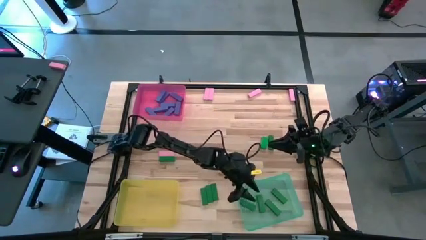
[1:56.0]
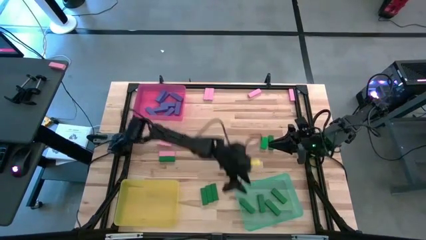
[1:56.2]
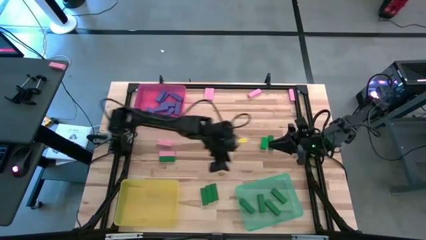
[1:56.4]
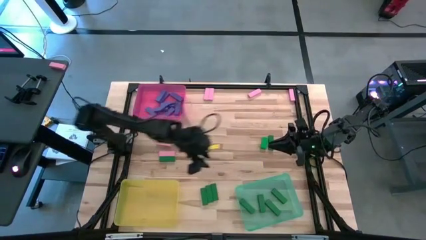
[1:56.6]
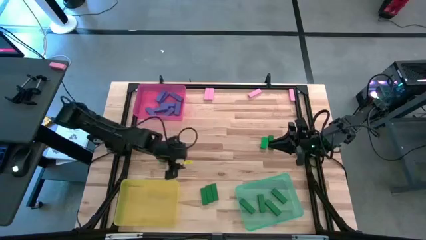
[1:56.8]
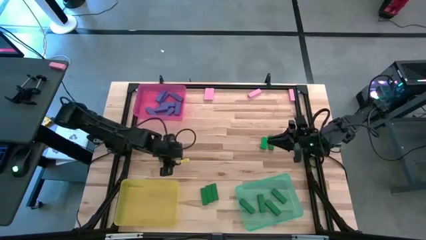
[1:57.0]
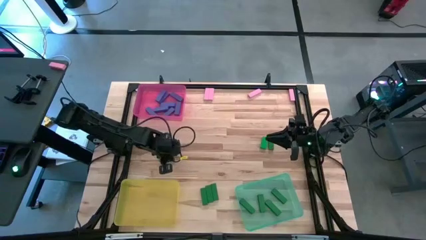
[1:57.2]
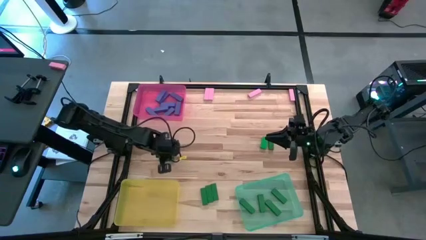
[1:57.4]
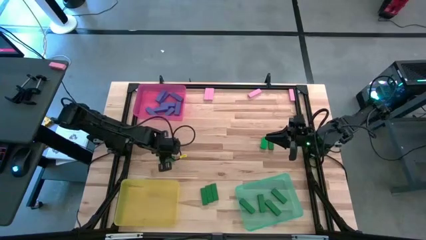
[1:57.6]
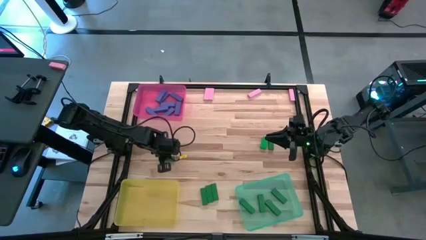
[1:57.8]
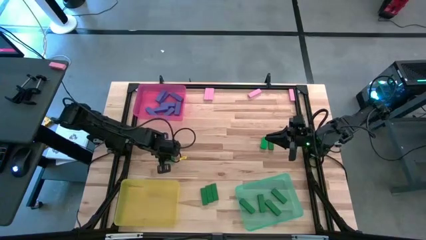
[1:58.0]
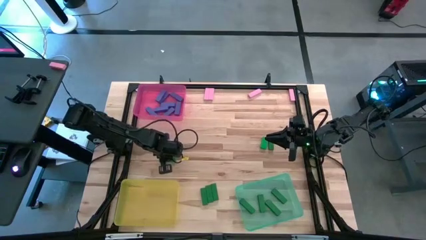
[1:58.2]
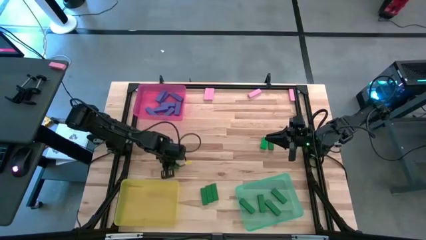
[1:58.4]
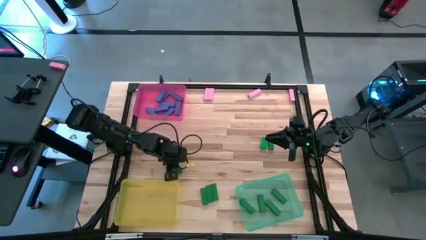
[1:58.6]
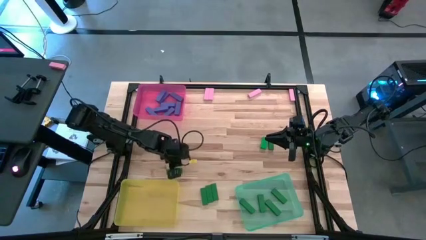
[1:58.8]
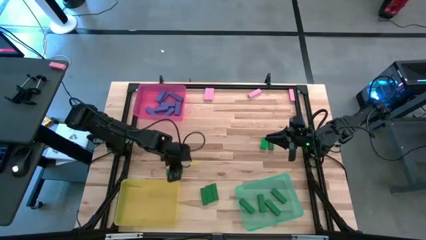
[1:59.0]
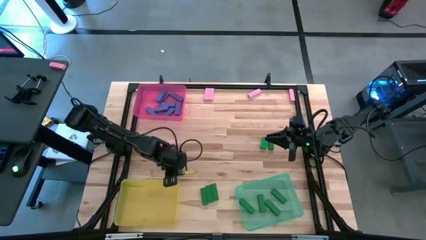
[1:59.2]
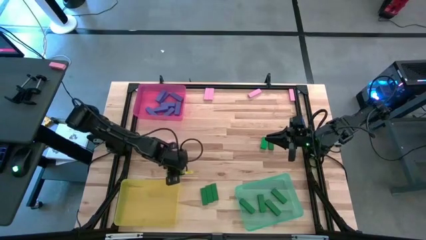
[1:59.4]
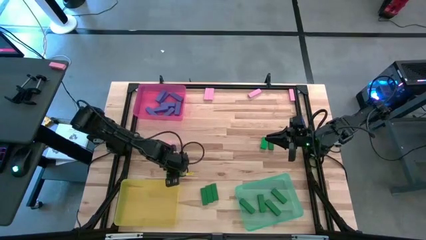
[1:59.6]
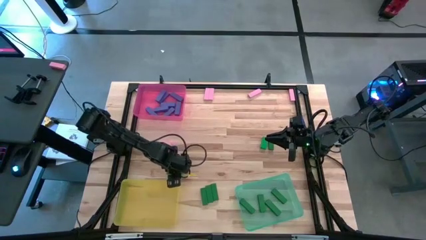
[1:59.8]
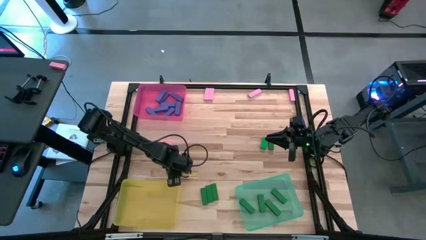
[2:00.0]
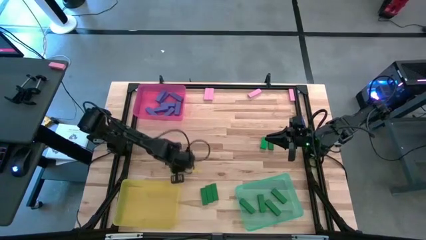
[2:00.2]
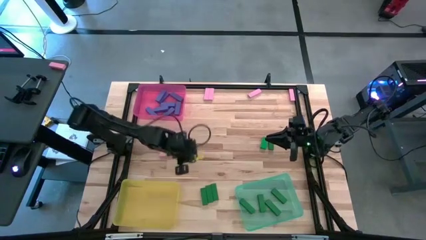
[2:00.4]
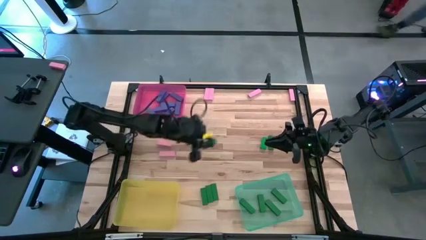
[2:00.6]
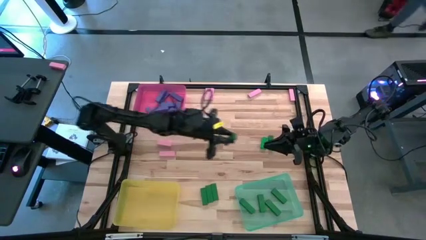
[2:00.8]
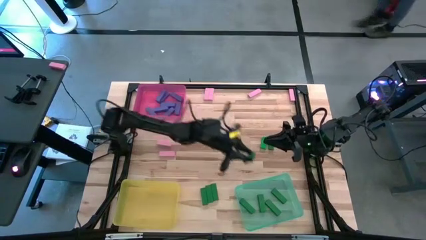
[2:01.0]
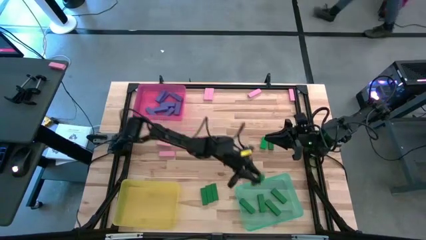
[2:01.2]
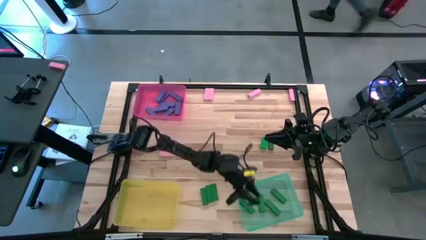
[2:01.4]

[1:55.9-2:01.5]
Task: Sort blocks
Put the green block into the light green bin

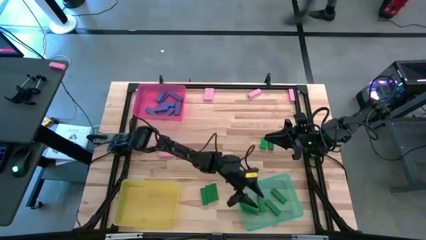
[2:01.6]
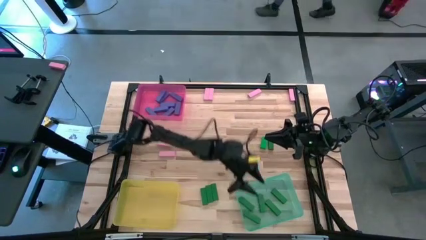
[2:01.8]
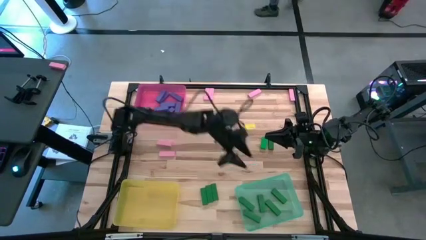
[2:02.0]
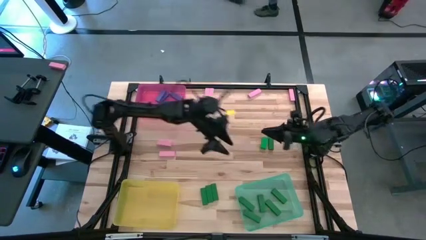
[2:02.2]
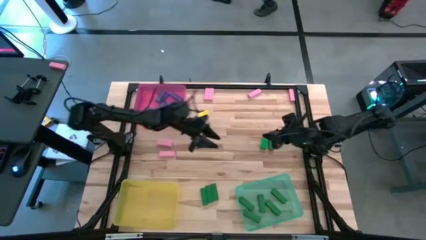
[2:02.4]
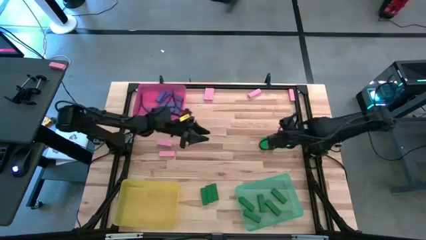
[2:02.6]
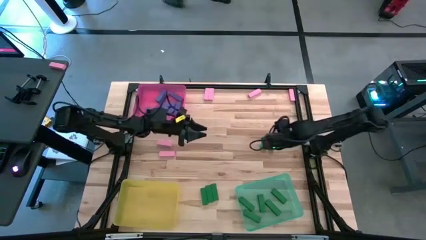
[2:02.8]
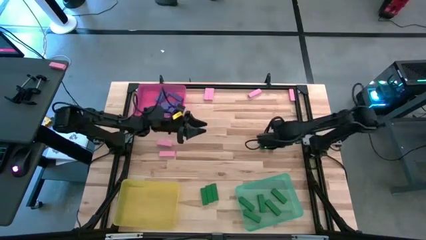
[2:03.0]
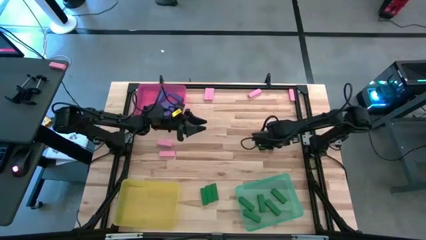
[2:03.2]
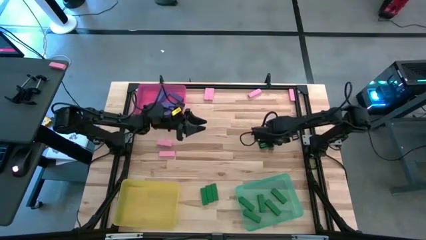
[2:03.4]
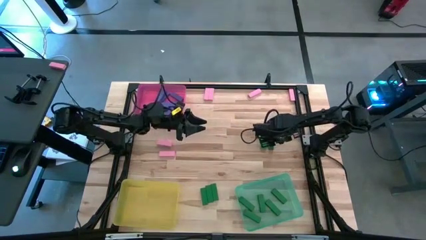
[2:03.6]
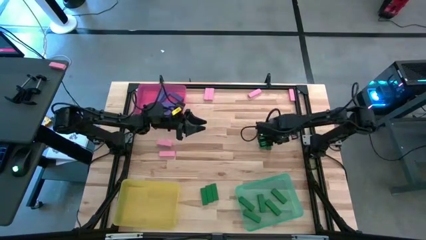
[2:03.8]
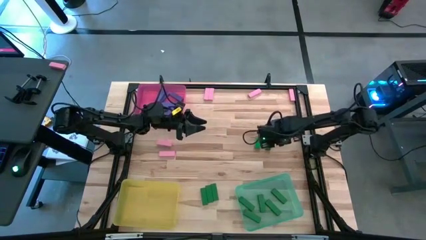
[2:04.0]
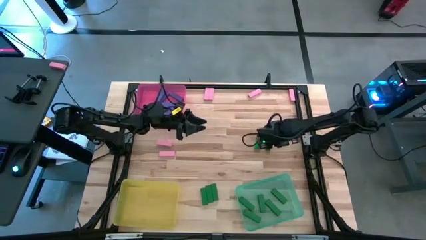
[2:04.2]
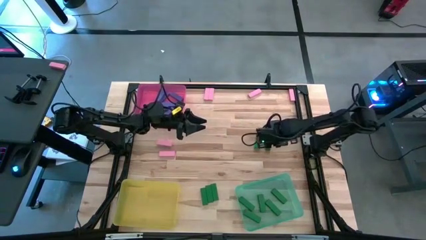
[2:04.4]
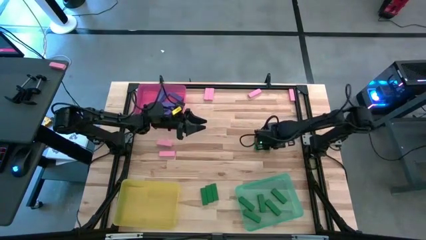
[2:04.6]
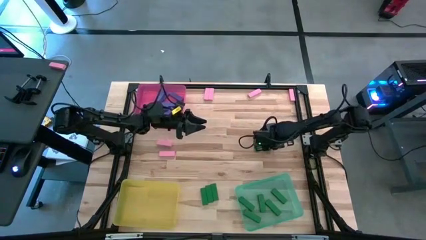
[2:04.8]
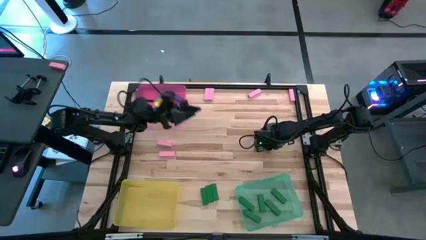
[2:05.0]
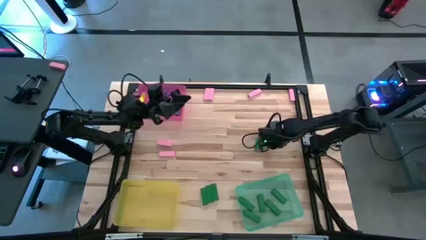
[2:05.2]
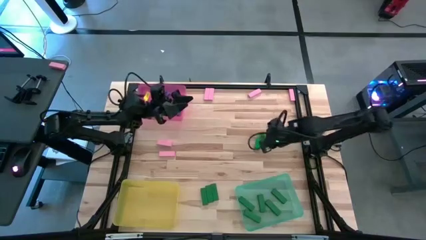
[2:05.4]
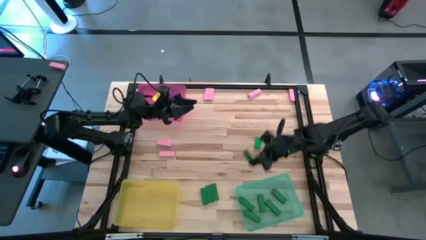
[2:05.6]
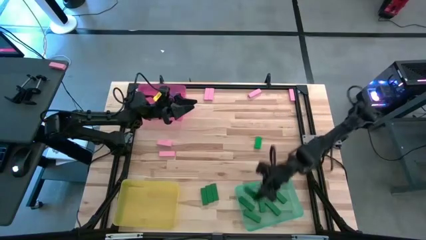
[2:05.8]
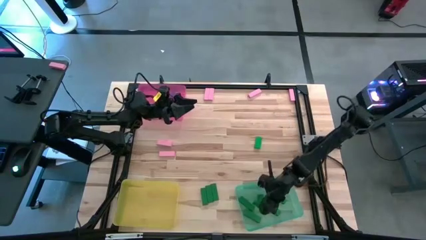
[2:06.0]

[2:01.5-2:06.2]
Put the green block into the light green bin

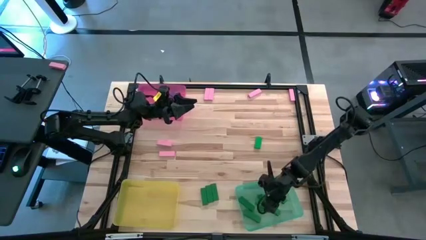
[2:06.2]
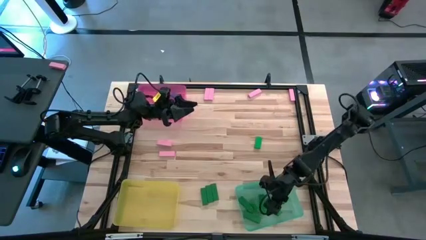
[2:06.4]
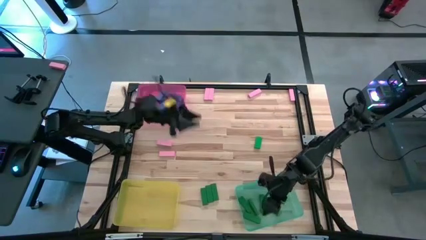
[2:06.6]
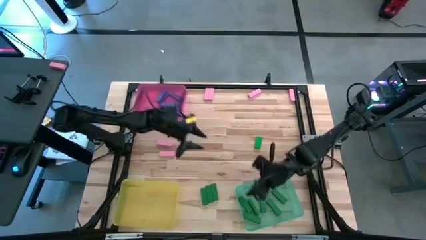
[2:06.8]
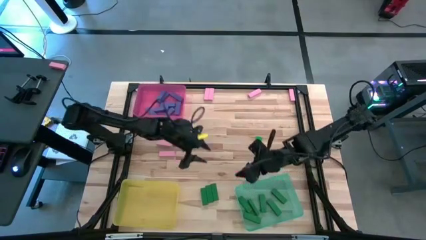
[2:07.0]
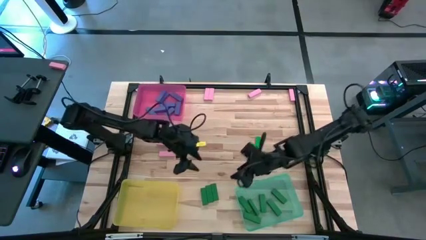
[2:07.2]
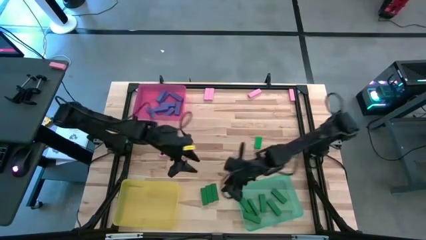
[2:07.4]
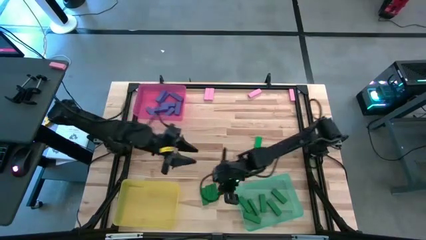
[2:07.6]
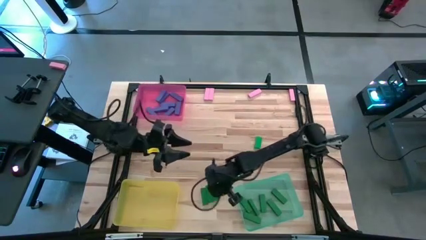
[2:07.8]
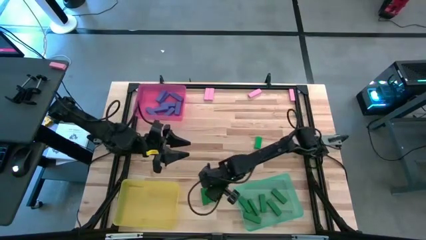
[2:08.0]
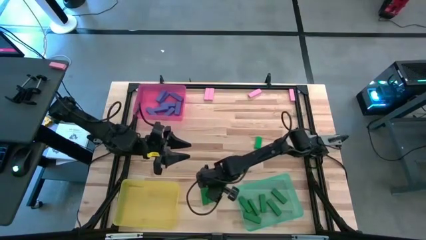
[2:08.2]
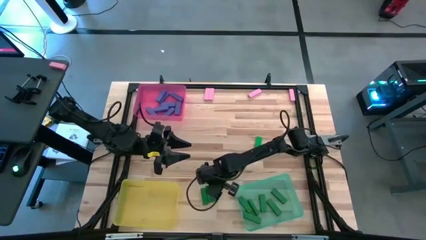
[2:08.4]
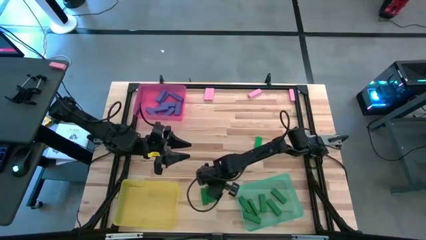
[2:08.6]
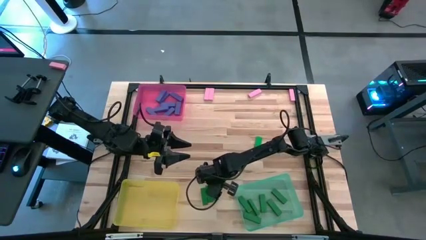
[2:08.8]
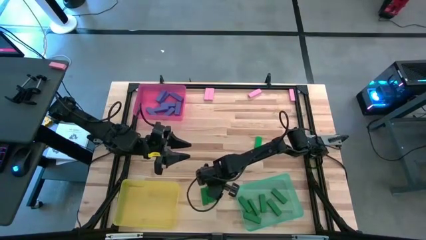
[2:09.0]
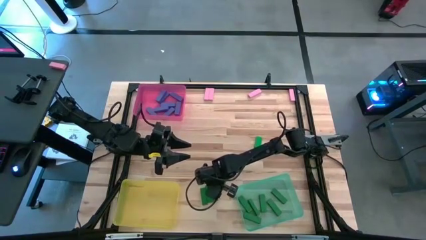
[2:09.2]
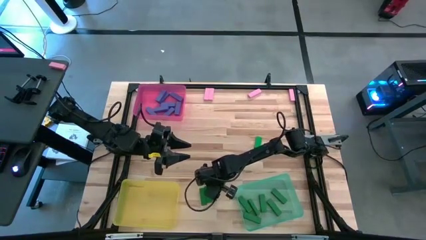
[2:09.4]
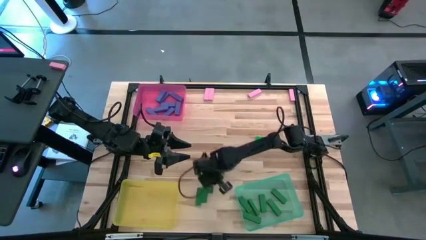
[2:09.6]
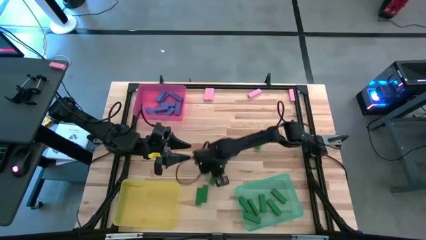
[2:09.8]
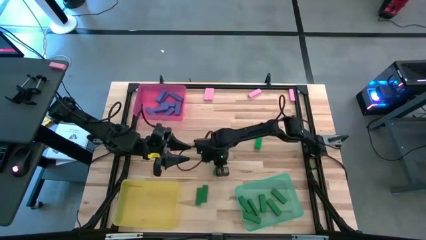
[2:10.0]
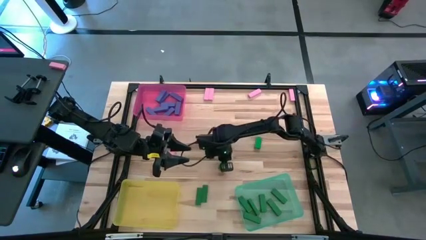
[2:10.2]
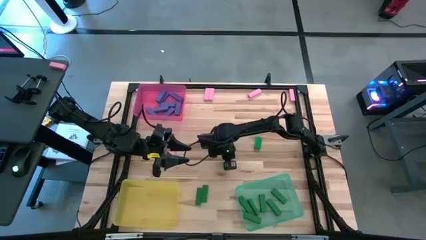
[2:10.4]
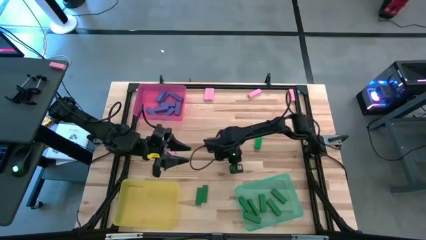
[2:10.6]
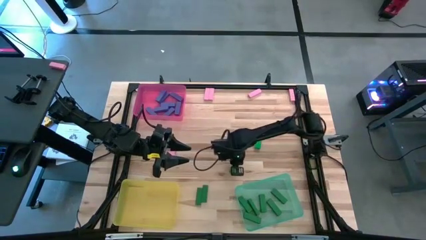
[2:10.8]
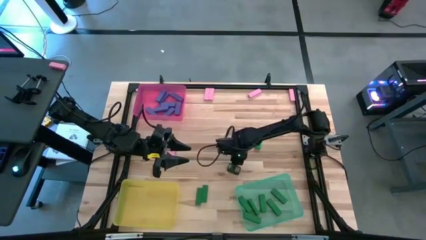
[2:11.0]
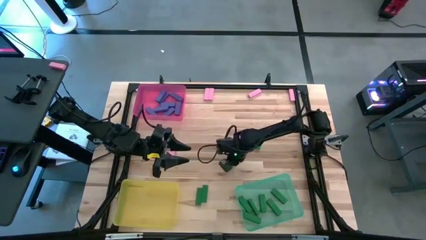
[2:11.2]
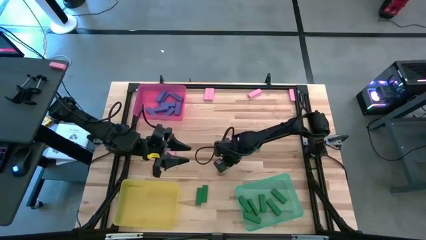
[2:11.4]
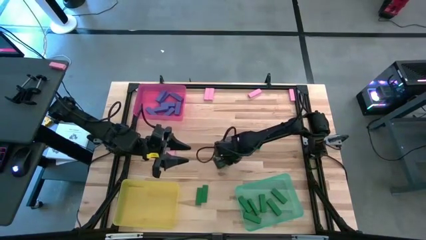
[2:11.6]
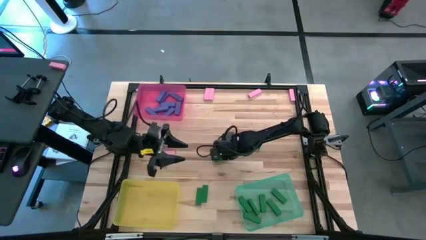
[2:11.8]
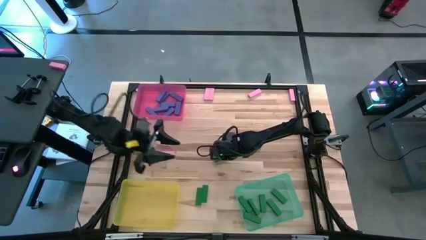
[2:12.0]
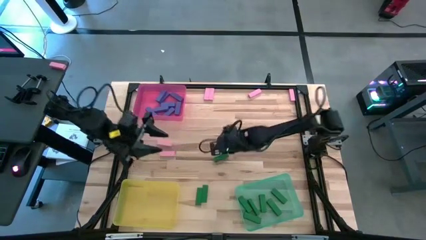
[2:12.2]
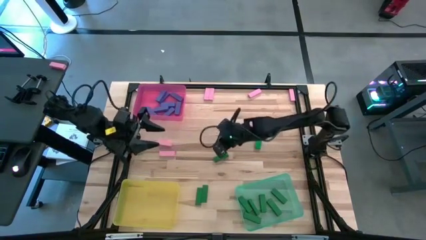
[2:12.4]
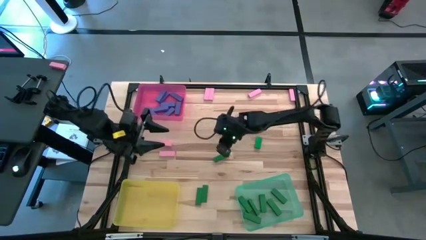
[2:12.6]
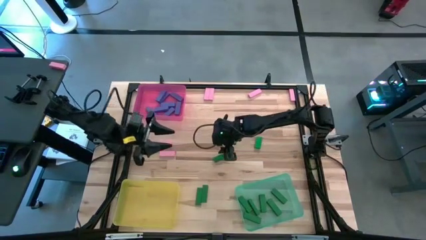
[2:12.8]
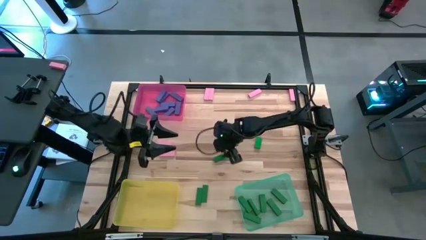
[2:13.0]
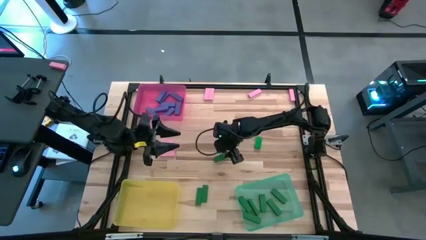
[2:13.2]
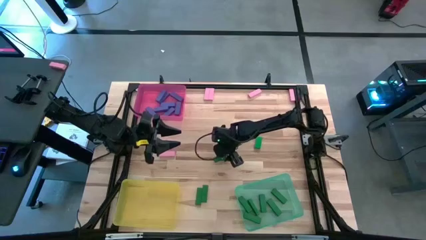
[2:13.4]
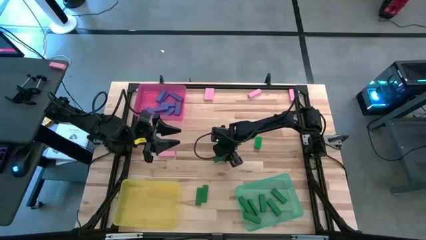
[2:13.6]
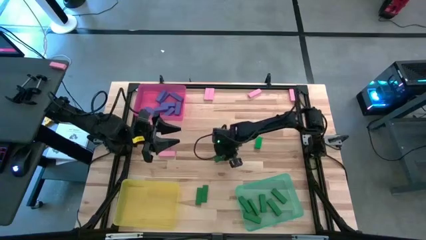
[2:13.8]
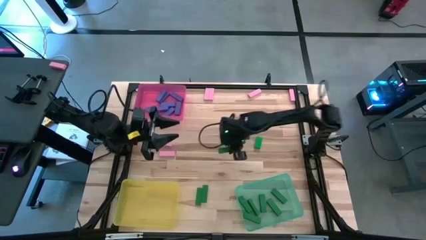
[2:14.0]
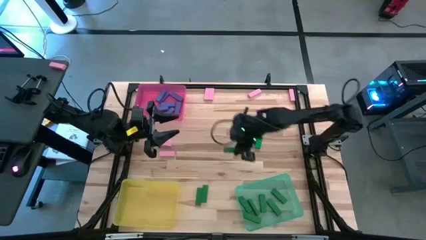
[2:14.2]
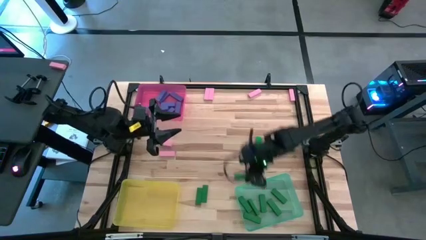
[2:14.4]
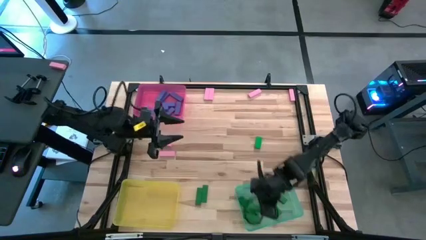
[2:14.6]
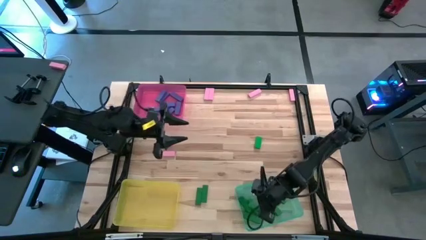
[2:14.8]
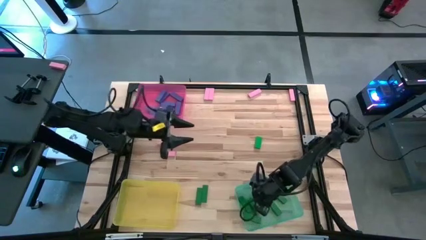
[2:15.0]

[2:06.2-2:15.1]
Put the green block into the light green bin
